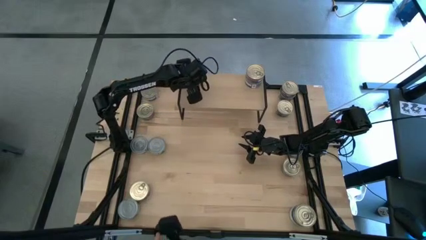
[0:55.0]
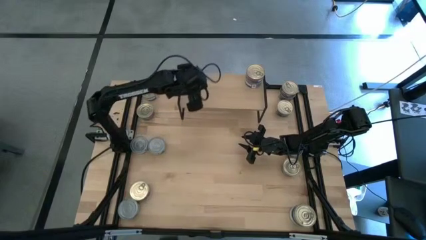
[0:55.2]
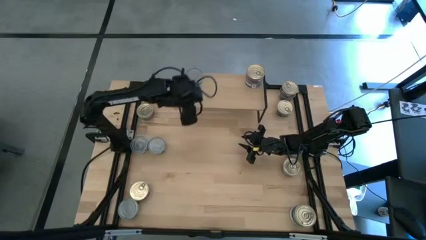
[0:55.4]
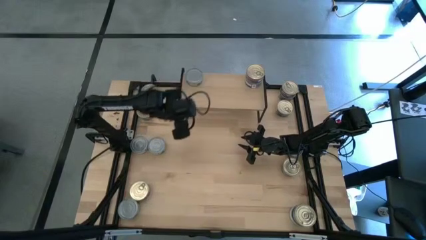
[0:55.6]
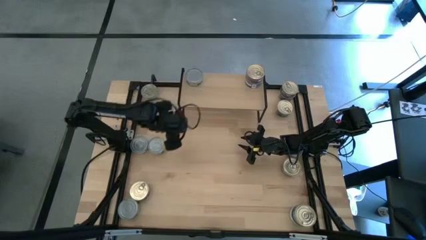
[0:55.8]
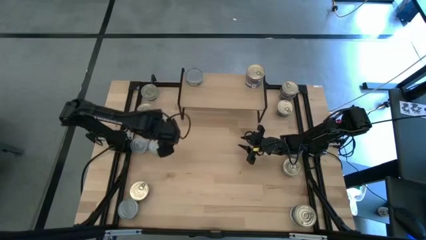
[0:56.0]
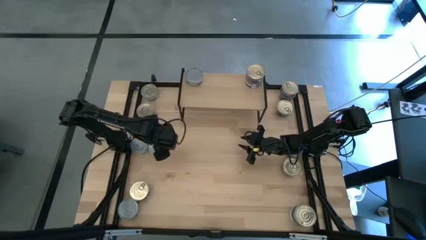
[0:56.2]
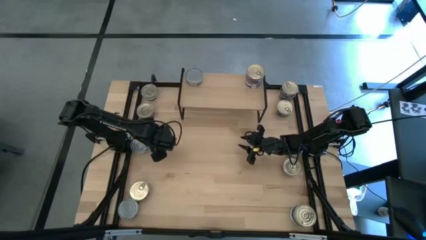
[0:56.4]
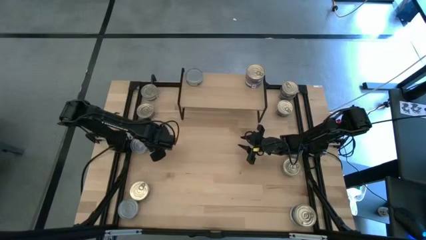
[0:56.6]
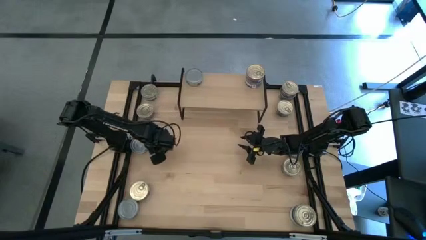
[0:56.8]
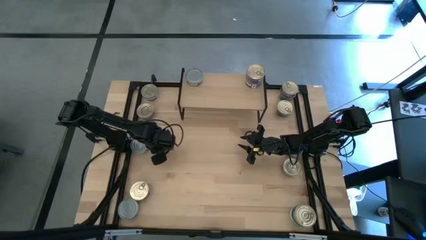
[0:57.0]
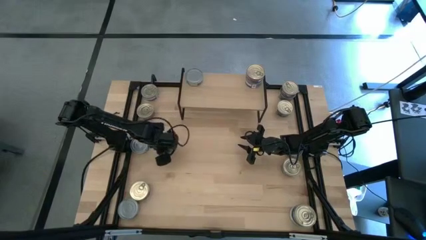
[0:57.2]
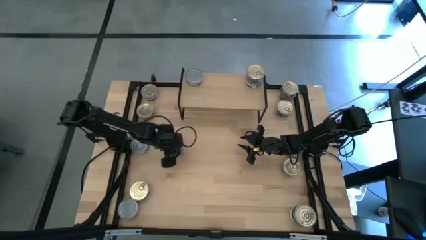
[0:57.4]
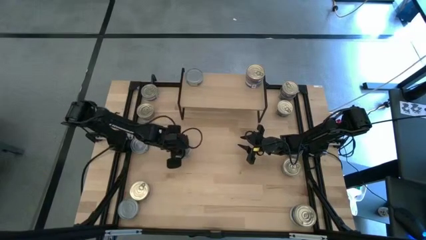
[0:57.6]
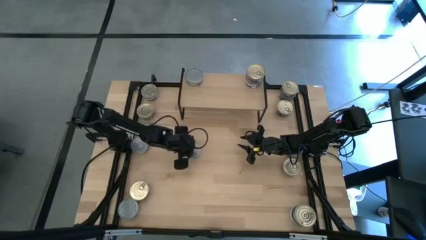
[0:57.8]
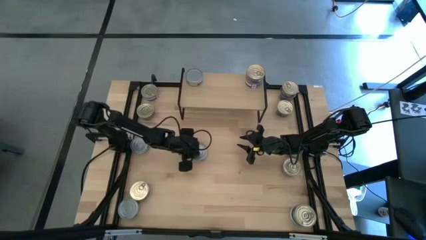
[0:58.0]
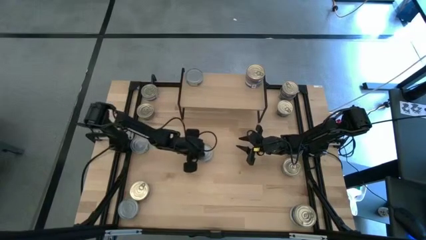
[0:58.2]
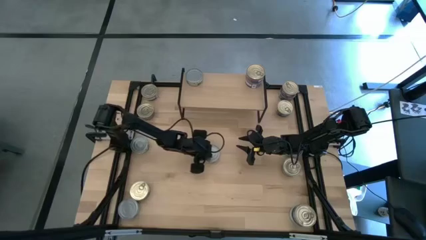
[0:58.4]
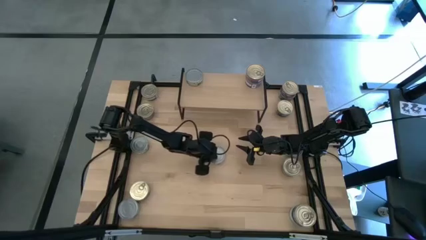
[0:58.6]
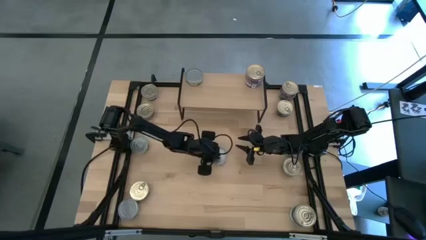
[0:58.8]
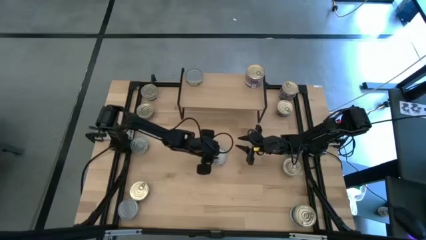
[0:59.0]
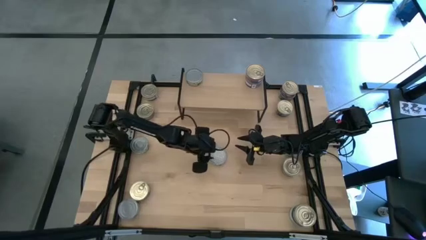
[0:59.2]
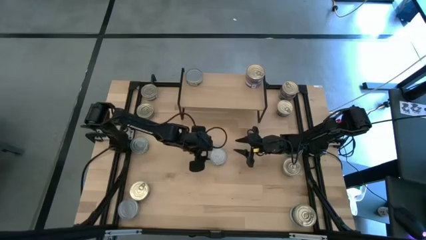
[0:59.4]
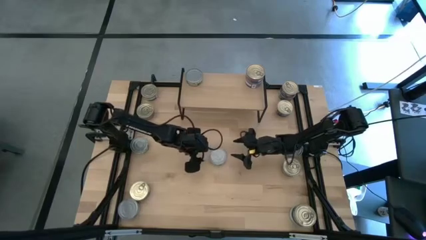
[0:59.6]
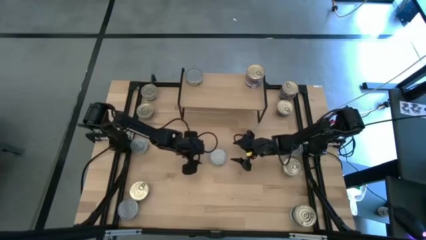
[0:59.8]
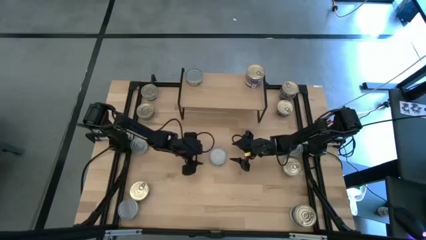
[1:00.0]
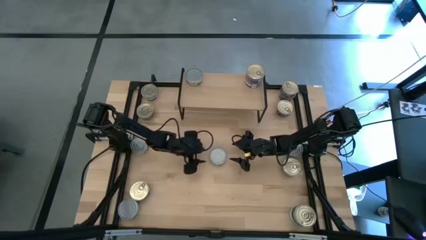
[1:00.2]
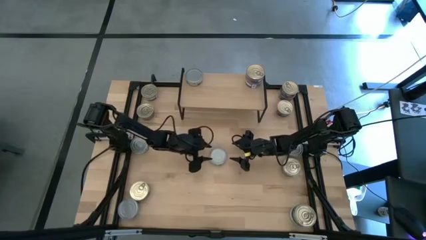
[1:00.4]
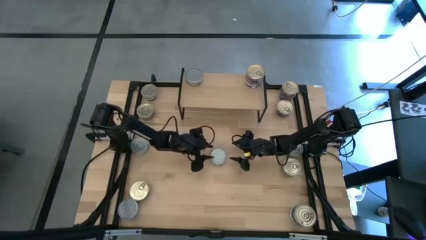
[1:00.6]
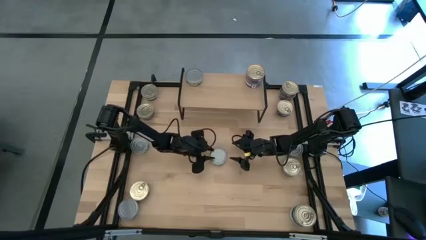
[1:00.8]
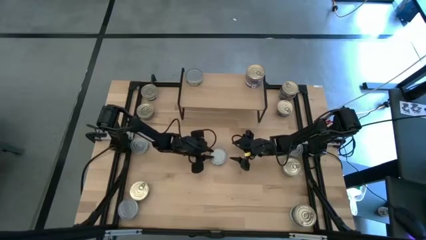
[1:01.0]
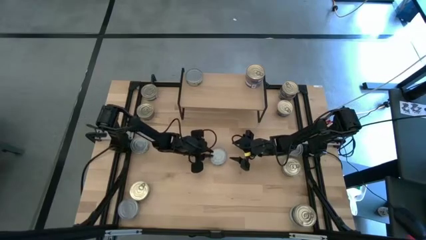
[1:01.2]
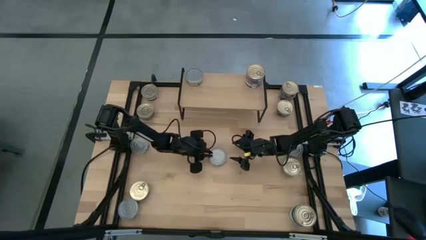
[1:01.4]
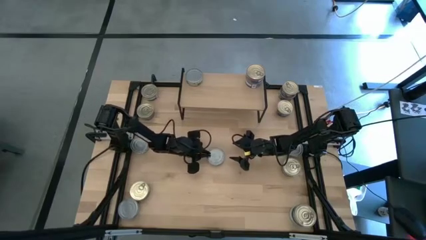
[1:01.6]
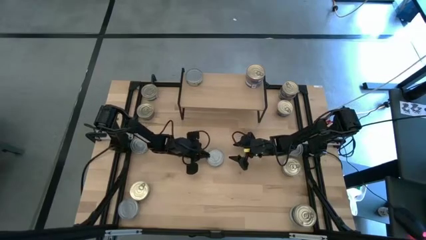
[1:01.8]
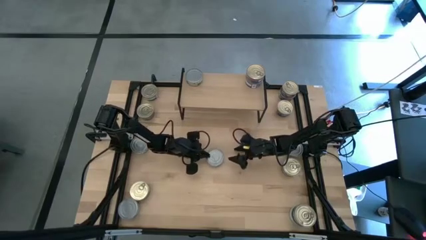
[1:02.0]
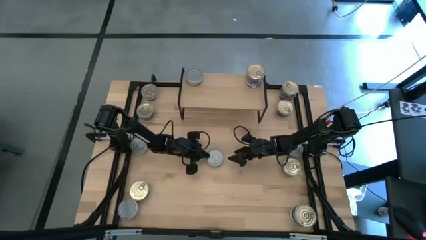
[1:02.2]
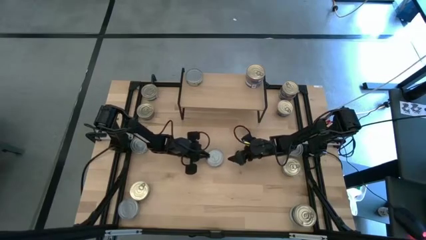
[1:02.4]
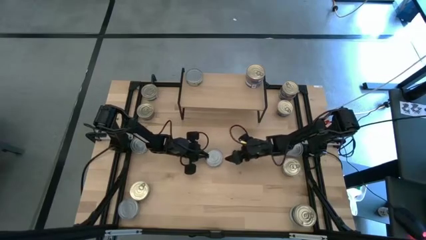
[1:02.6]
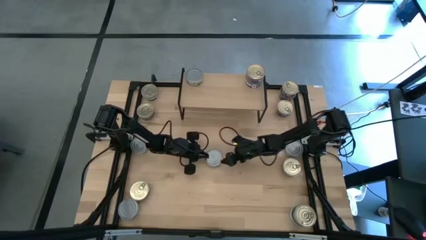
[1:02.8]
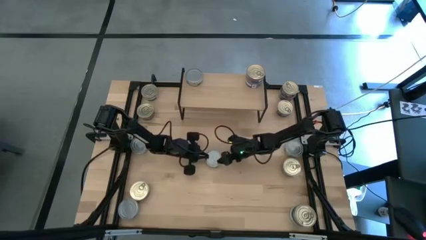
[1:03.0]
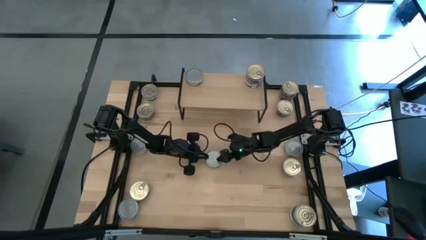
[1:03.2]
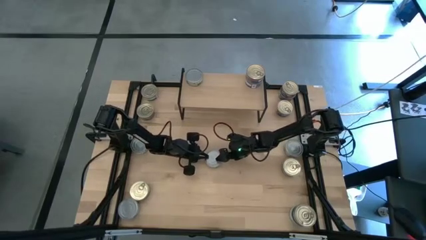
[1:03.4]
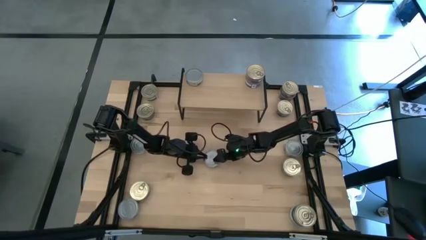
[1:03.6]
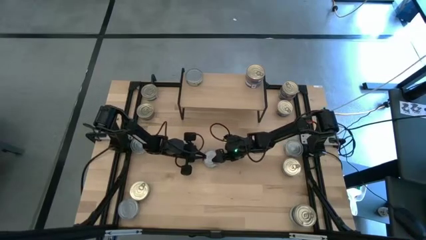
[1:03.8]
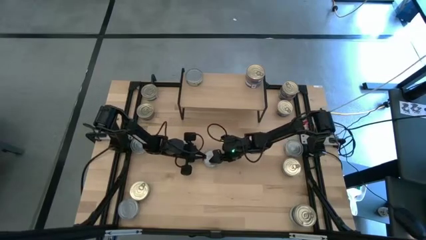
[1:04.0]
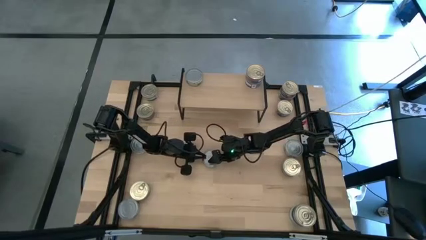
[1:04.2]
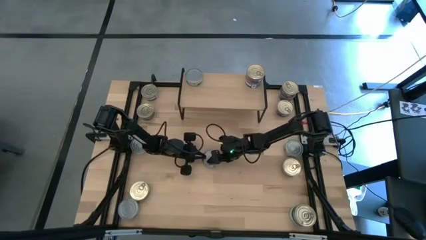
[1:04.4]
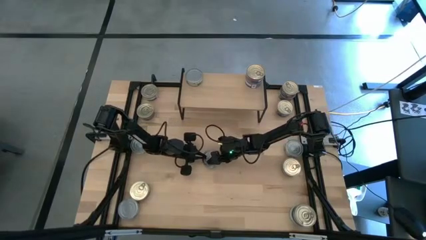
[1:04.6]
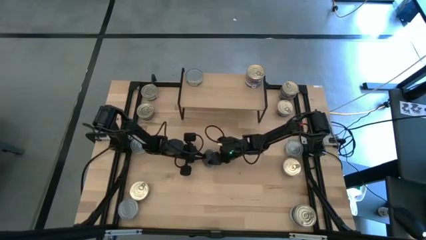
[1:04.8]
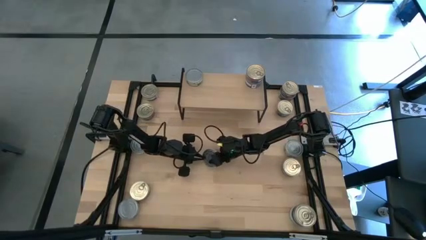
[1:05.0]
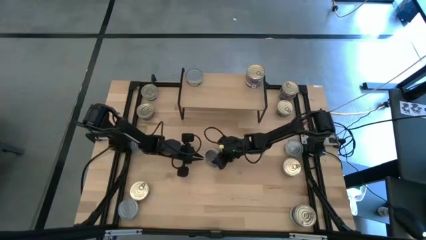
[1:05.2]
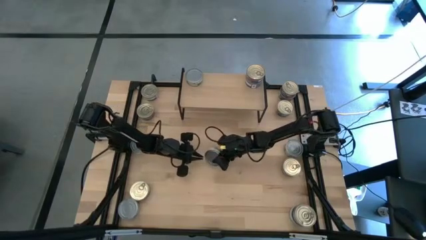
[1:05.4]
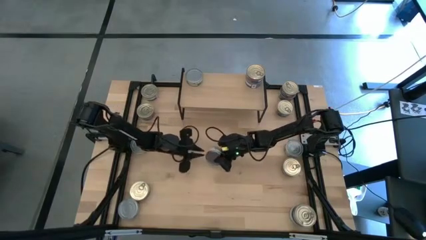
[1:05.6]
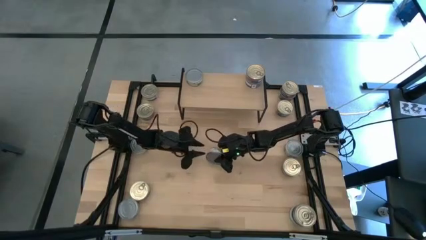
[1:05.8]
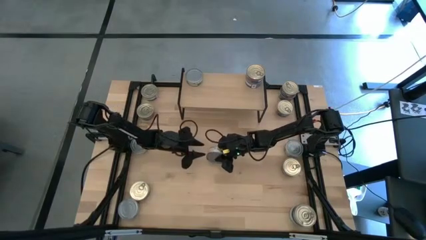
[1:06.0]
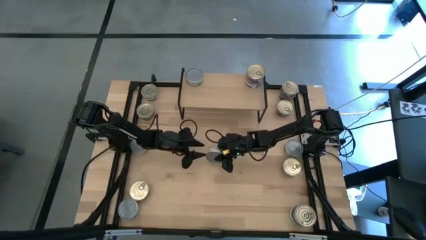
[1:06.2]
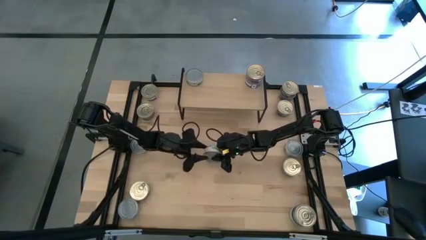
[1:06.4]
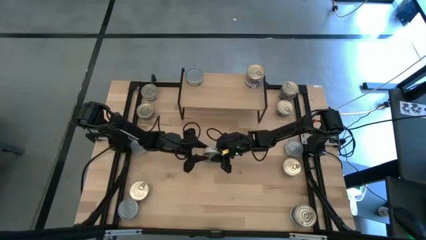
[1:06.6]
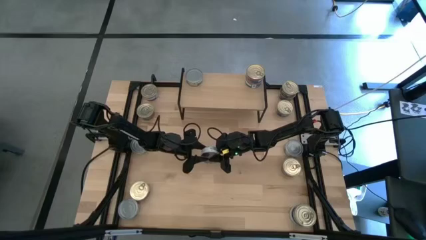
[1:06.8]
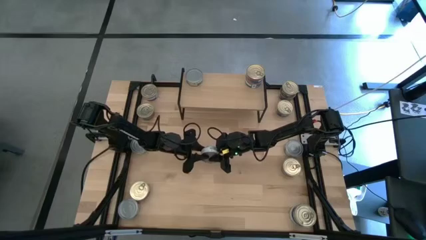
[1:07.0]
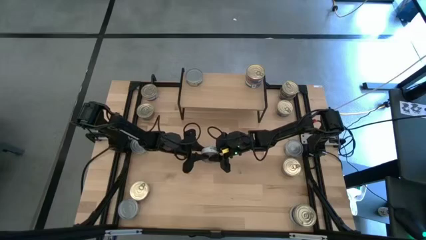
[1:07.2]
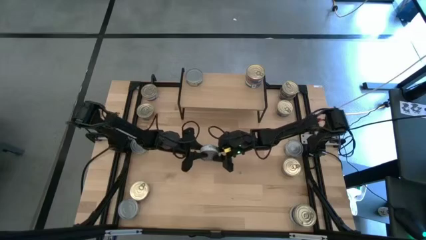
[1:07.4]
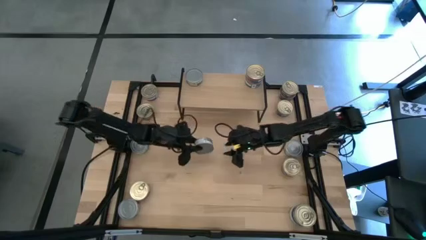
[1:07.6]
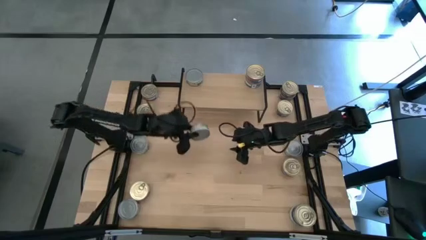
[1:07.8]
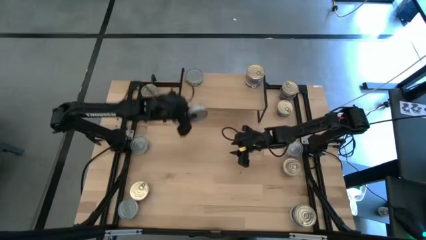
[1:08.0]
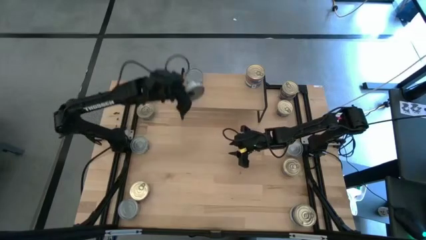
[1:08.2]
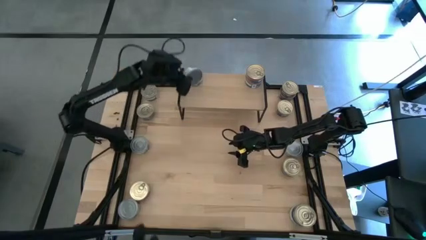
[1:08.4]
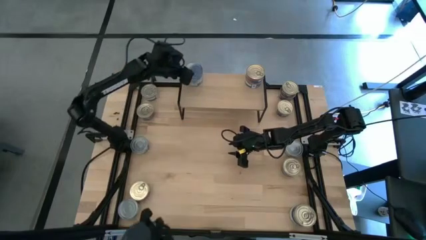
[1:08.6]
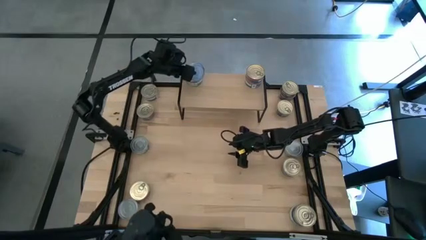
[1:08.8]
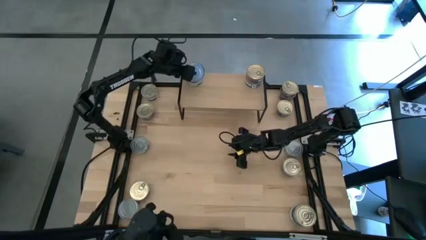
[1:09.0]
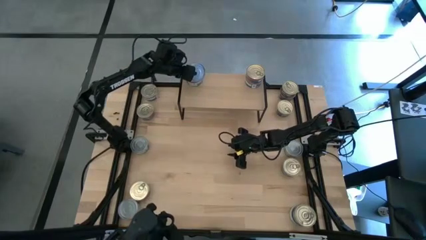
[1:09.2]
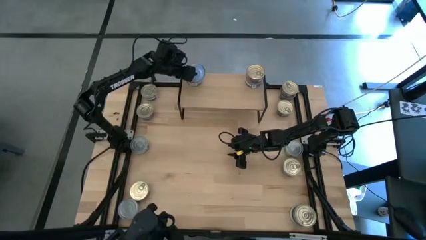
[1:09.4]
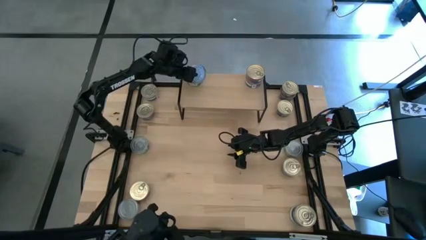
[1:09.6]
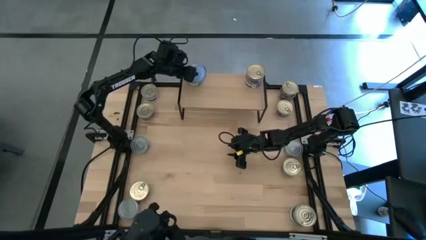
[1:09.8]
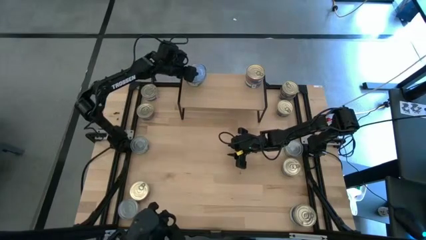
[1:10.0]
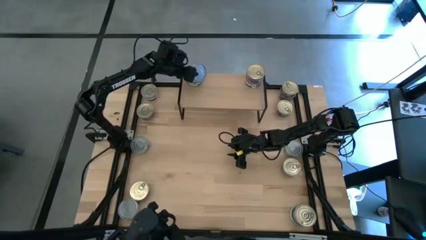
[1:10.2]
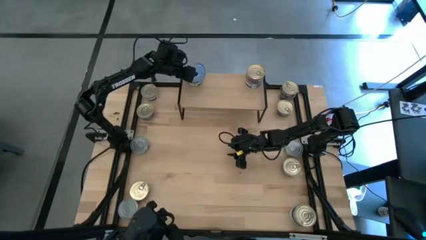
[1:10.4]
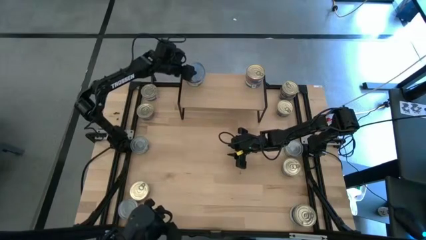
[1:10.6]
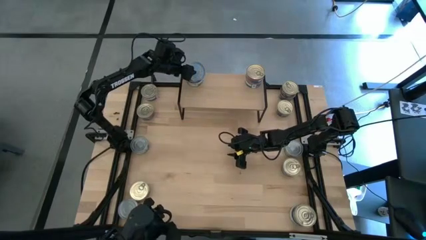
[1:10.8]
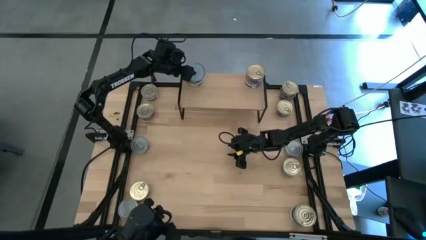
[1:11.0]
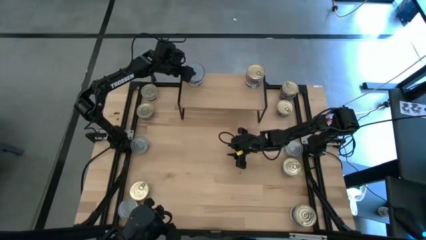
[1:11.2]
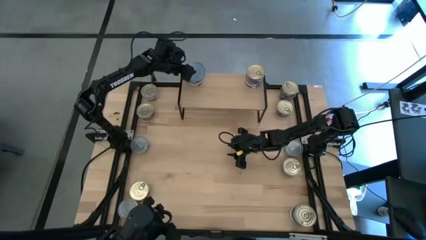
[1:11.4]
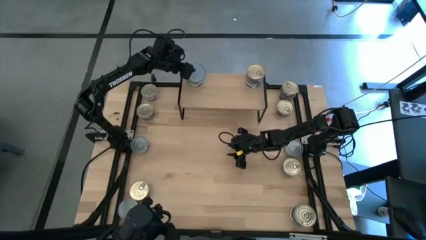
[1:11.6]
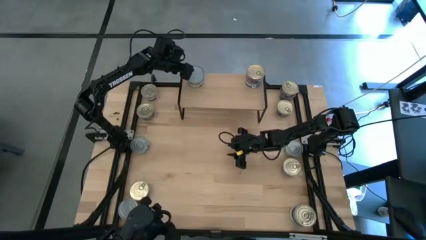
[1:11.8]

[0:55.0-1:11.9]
Task: Stack canned seafood by type on shelf
Stack the green white tuna can on top of the green white tuna can on the shelf
